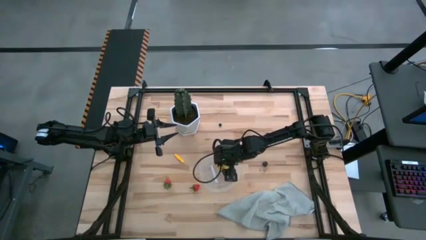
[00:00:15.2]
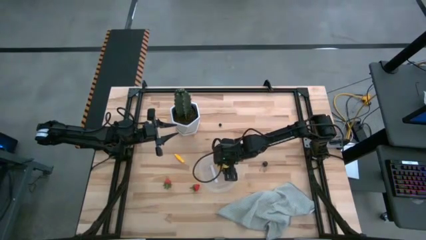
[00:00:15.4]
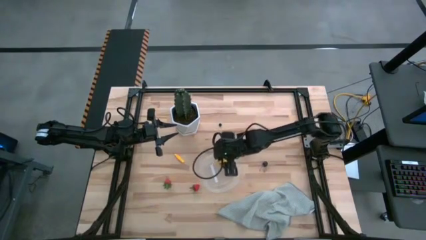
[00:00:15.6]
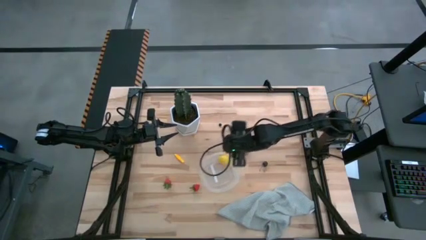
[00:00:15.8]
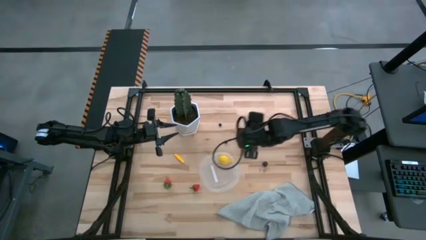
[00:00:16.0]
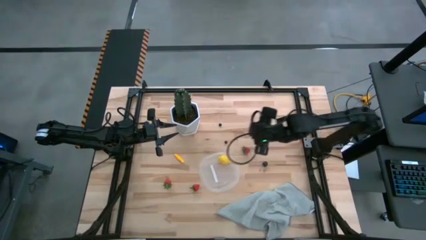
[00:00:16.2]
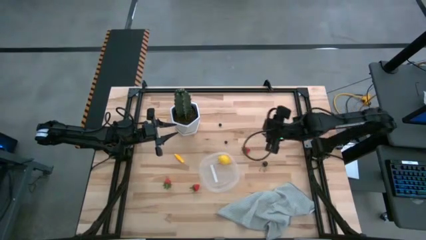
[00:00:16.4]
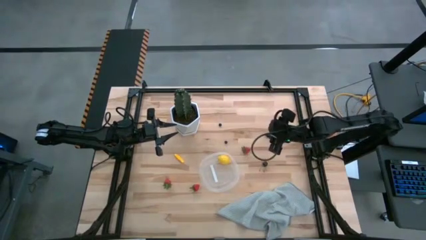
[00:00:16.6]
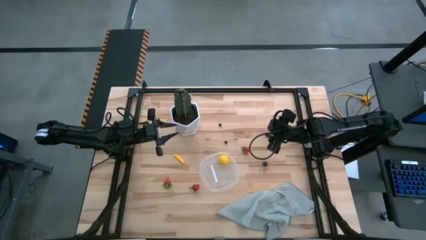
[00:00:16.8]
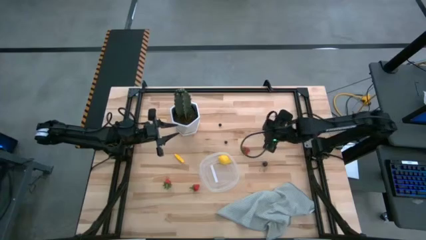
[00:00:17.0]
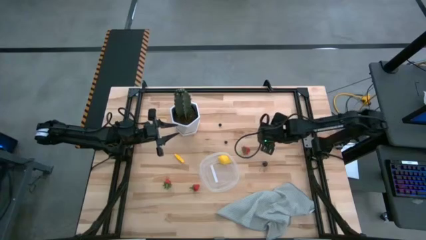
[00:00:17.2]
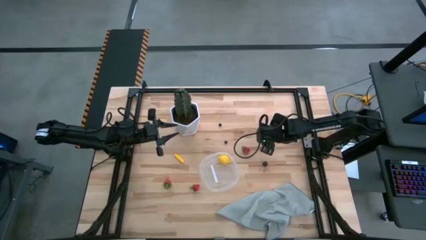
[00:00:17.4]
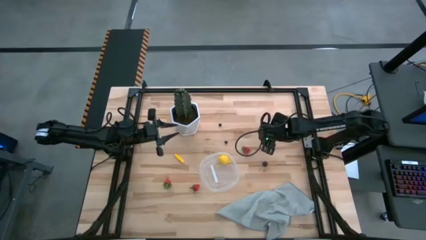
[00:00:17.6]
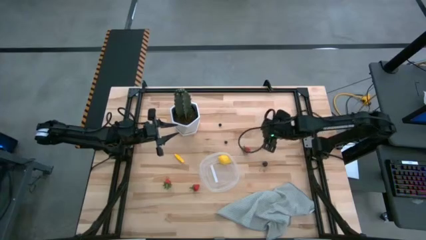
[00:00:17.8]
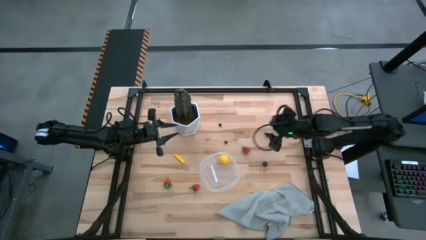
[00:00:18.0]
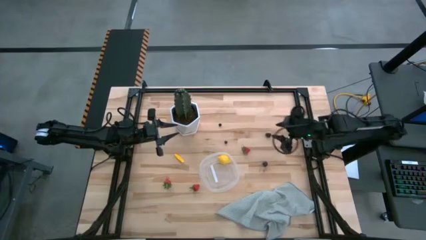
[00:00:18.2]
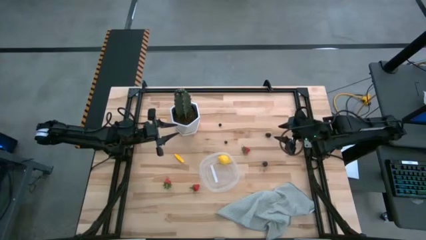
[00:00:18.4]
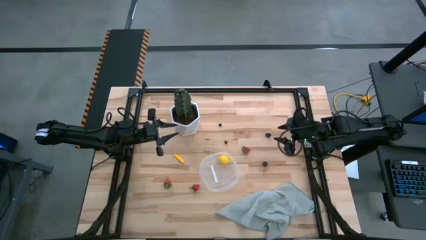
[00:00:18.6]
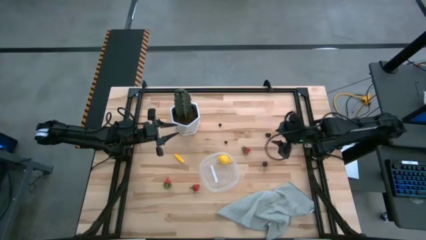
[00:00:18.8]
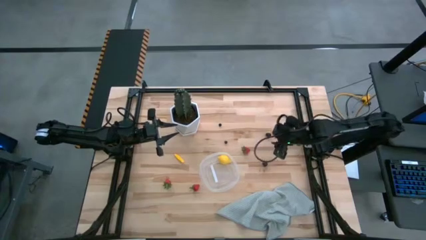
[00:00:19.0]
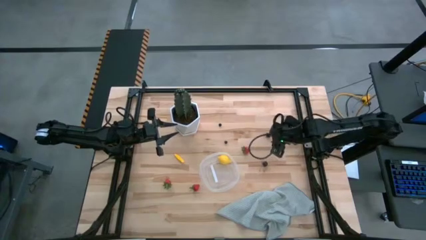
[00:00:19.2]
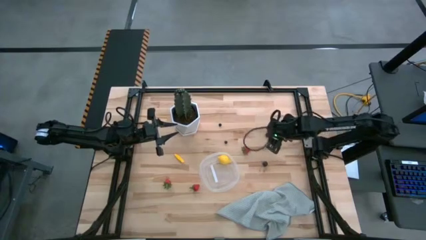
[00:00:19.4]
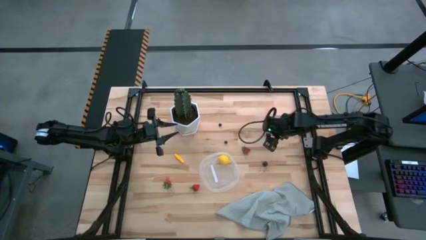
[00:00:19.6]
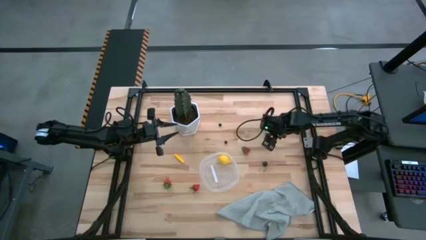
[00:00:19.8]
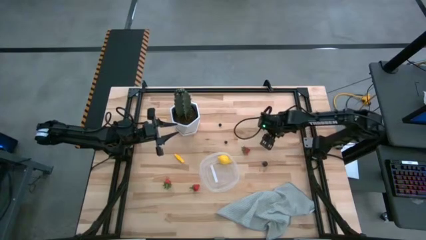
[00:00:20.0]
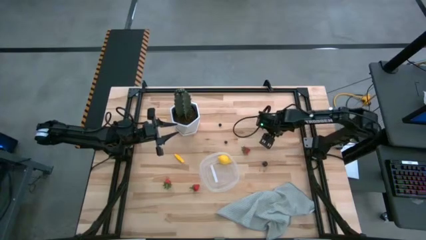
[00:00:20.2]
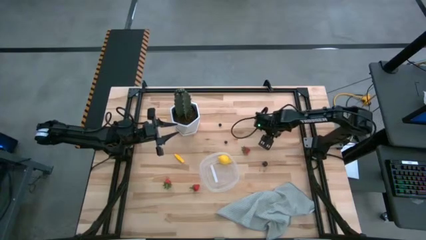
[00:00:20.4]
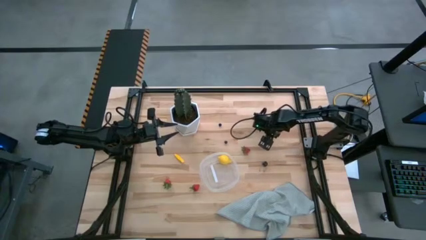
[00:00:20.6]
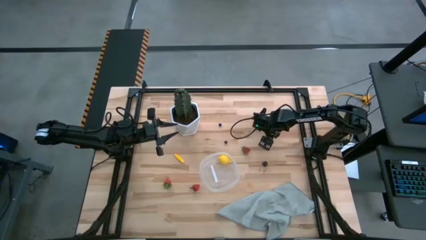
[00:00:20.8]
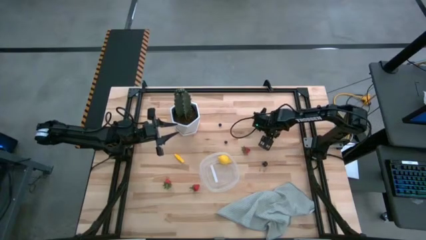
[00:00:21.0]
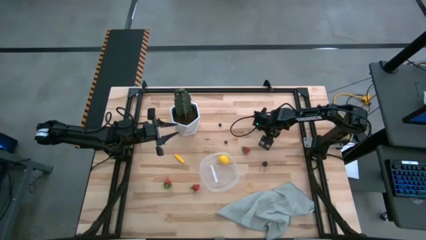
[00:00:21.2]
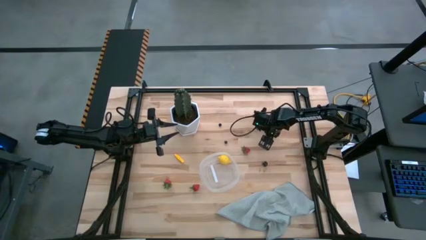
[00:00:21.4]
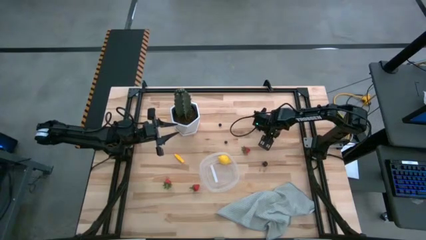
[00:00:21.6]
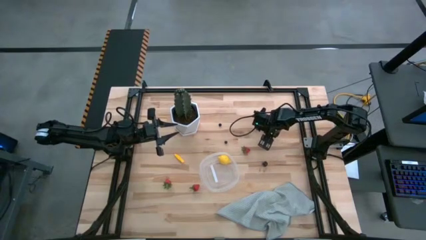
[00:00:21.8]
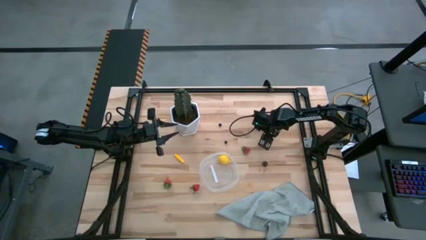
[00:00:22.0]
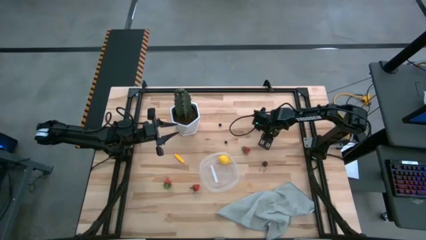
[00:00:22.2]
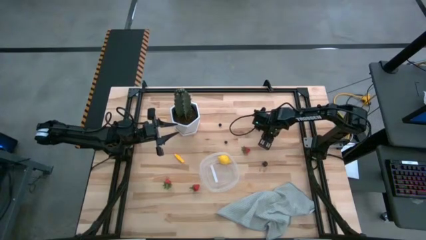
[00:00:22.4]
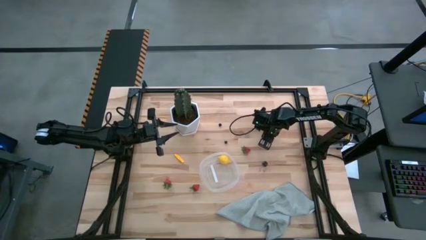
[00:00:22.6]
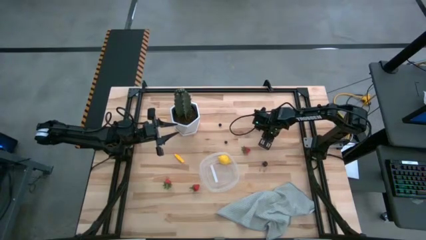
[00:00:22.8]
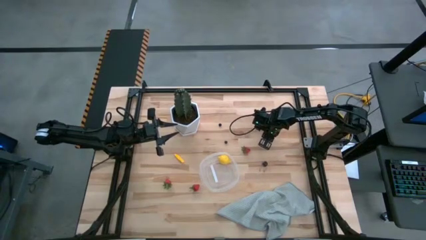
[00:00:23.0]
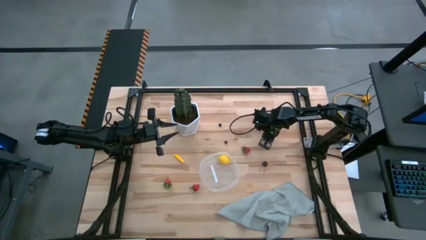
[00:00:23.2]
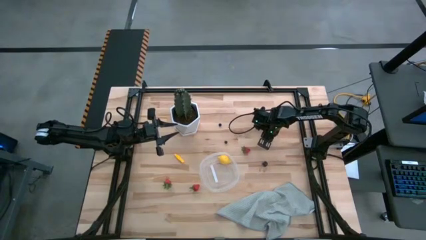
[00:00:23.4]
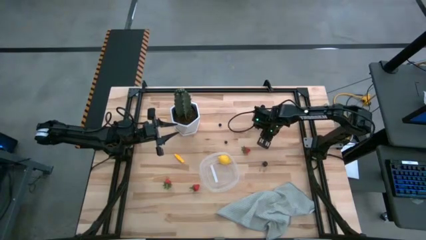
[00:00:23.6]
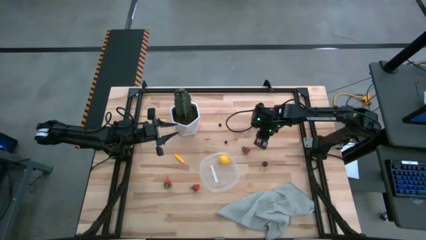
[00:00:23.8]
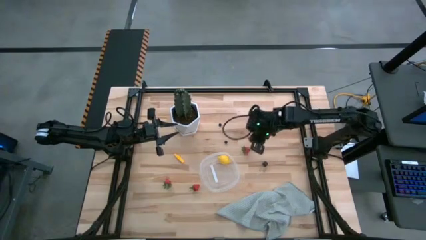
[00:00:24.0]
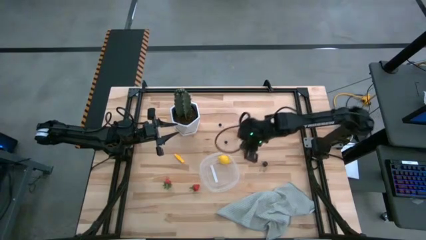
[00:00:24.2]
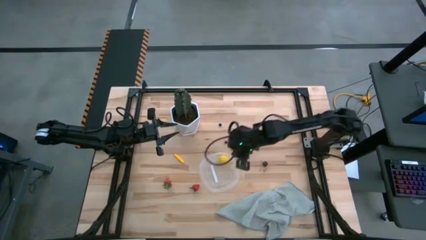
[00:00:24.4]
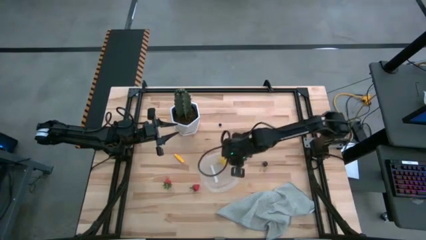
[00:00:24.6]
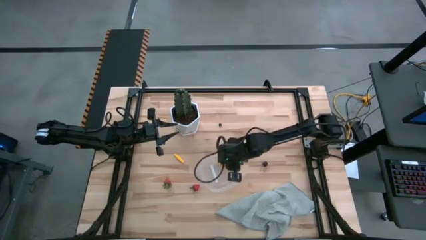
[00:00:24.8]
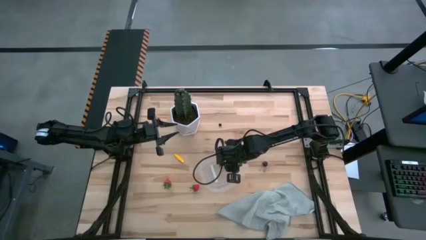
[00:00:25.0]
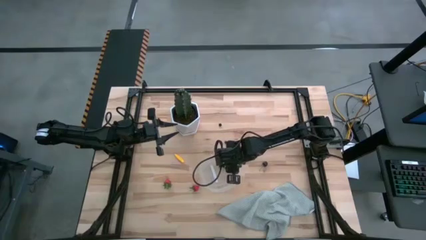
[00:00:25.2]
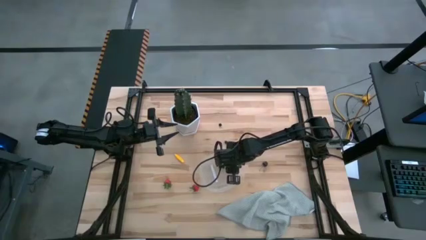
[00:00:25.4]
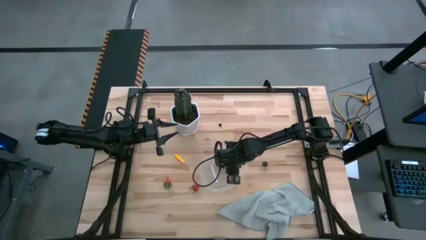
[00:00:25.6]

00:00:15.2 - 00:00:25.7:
Task: Pick and placing Produce into tupperware
Put the blackberry into the transparent container

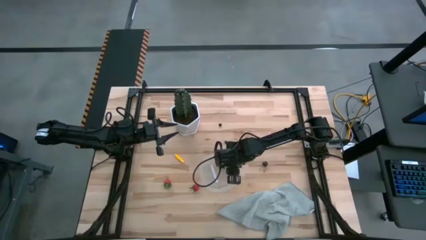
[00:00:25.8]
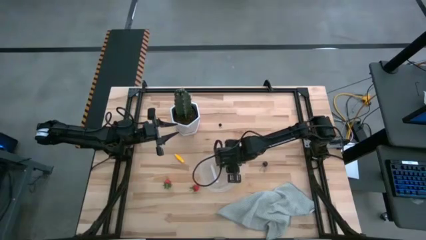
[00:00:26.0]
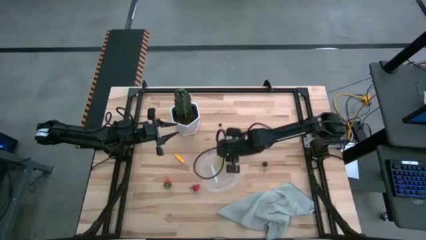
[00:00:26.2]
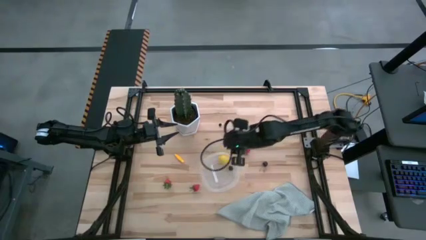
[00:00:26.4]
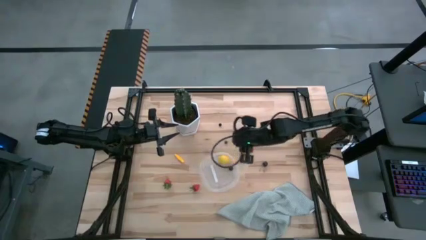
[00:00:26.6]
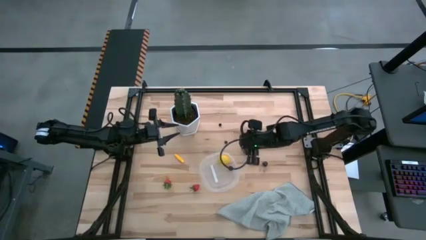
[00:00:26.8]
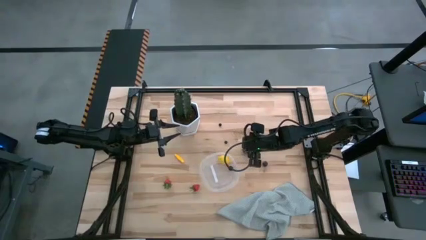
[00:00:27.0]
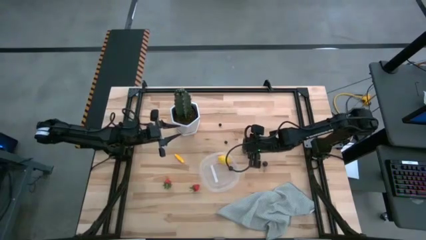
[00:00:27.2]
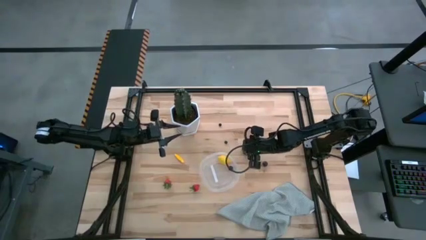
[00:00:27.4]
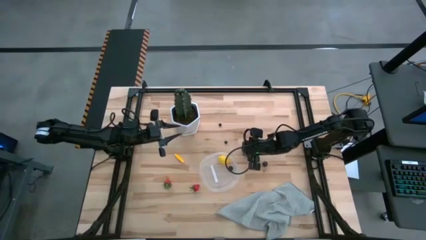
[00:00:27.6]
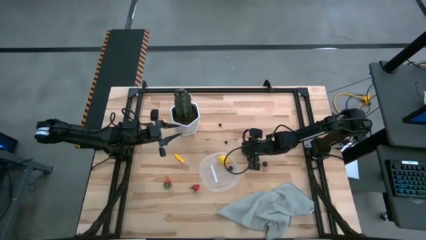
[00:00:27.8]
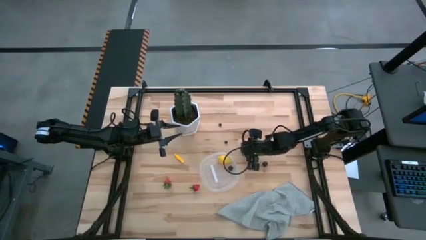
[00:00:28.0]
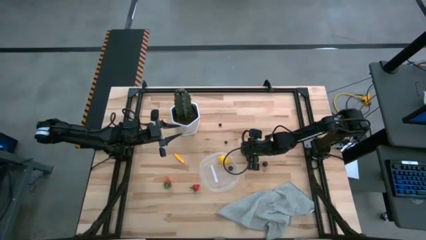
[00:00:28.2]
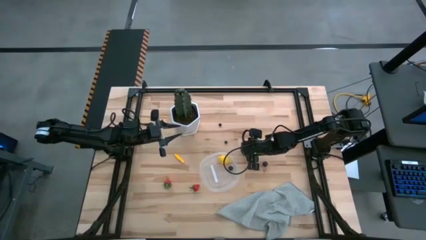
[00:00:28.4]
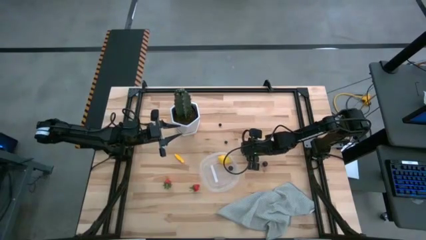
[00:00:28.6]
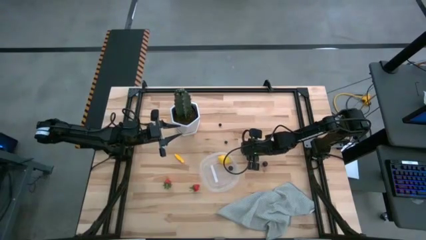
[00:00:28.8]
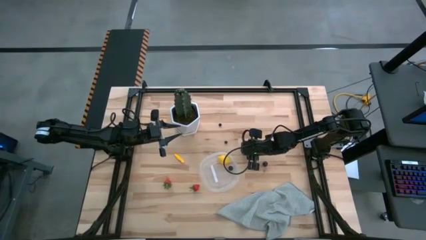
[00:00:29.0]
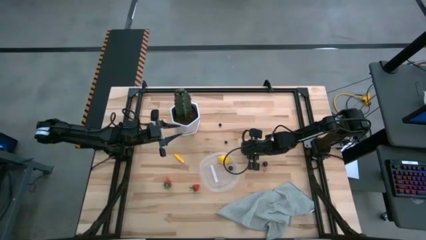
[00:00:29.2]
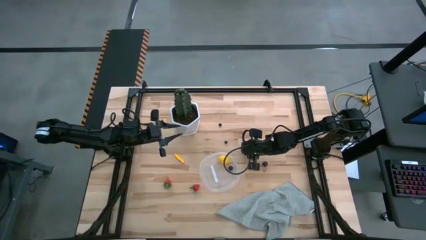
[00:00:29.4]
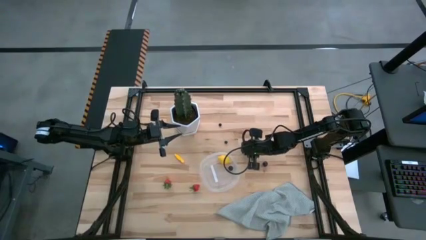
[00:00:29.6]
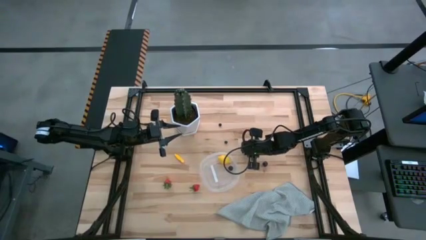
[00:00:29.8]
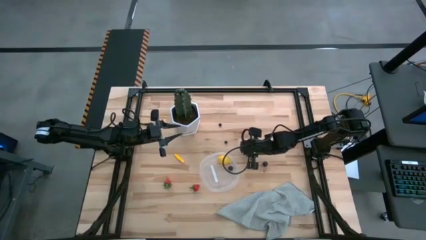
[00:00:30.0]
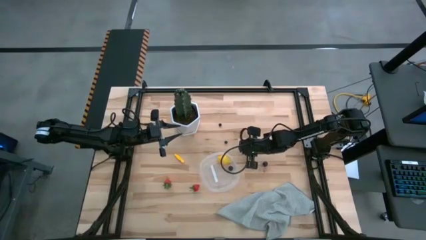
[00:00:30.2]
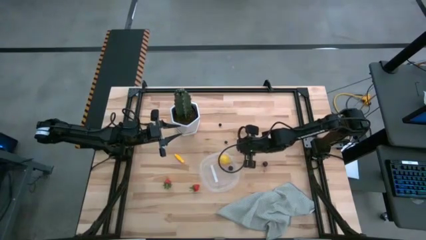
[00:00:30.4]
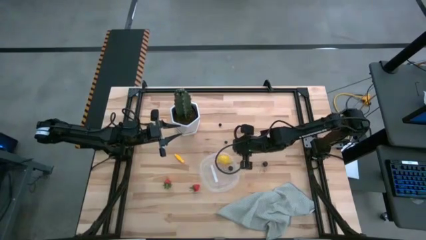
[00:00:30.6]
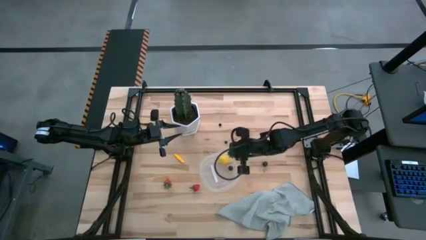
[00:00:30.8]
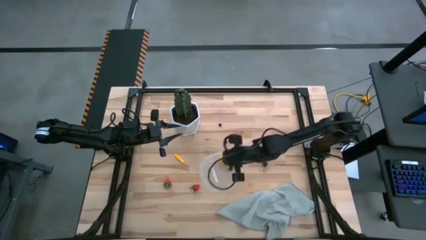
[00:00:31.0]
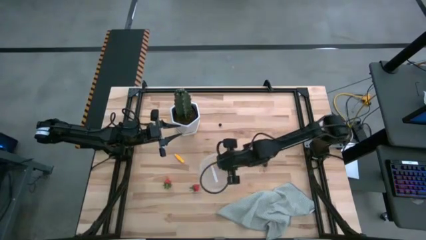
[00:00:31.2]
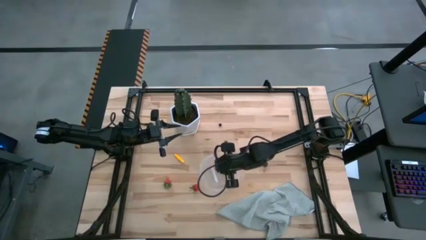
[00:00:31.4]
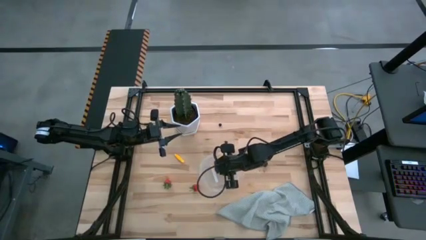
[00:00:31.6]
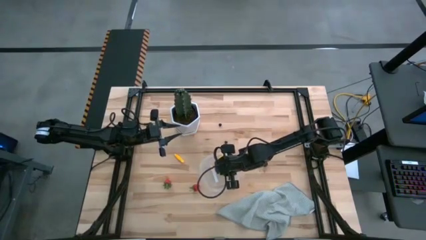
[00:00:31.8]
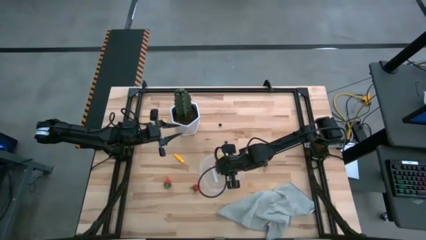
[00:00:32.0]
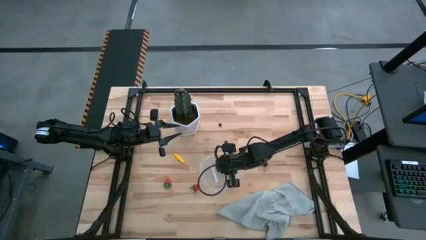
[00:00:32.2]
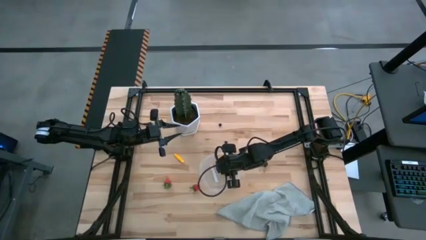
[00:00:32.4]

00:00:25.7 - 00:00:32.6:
Put the top red strawberry into the transparent container
